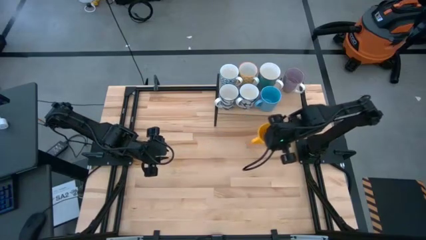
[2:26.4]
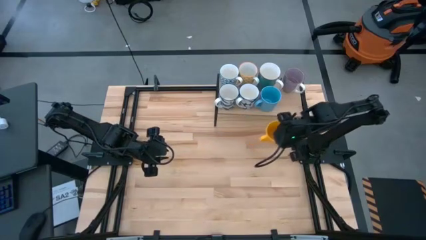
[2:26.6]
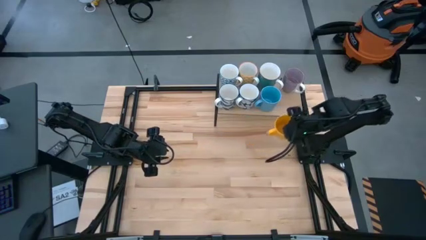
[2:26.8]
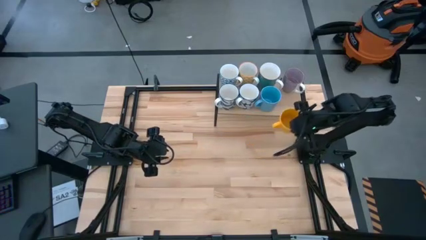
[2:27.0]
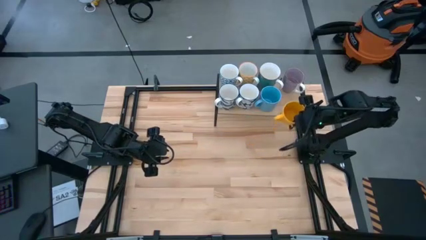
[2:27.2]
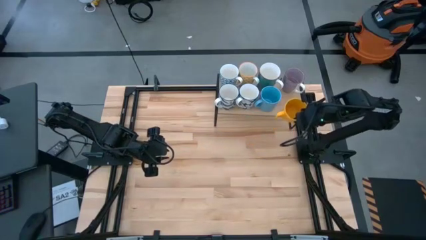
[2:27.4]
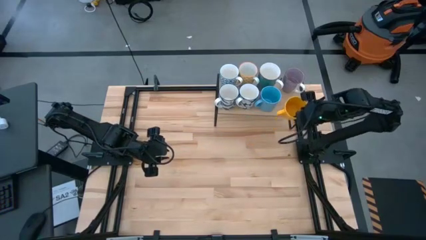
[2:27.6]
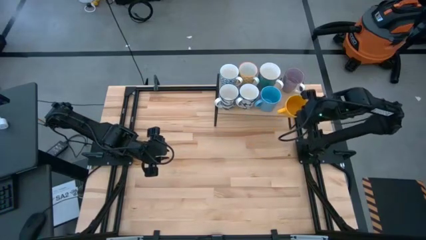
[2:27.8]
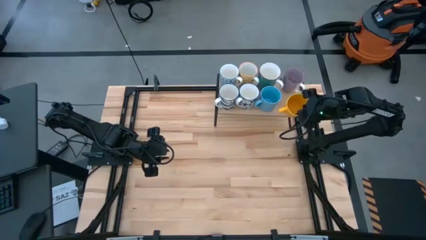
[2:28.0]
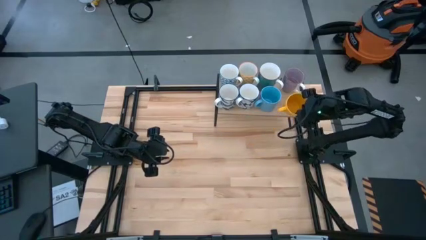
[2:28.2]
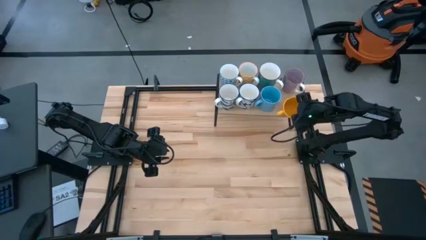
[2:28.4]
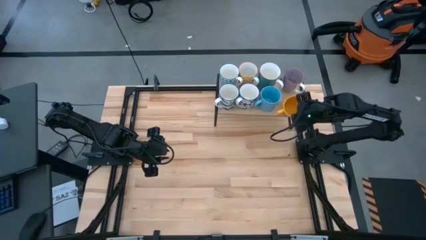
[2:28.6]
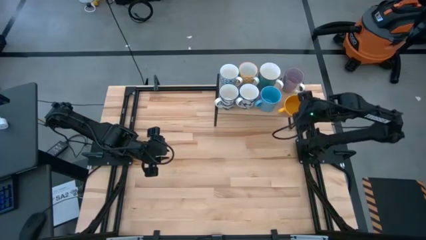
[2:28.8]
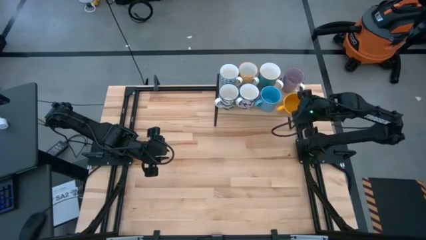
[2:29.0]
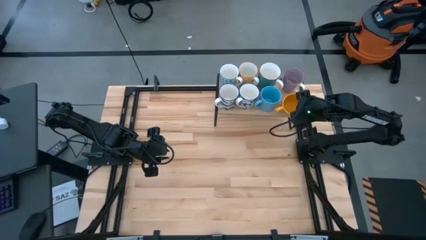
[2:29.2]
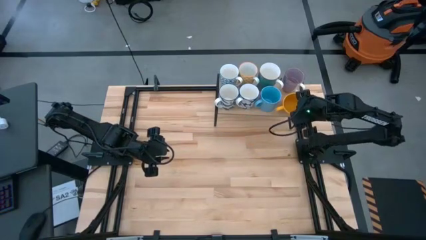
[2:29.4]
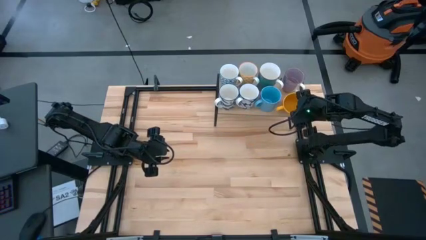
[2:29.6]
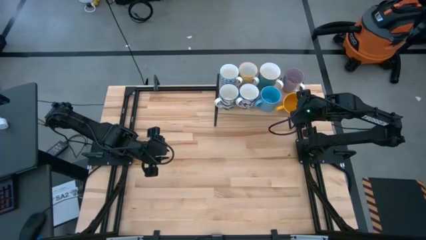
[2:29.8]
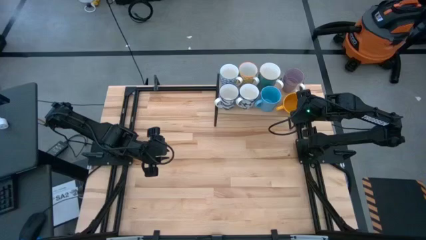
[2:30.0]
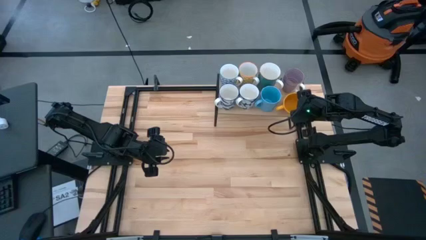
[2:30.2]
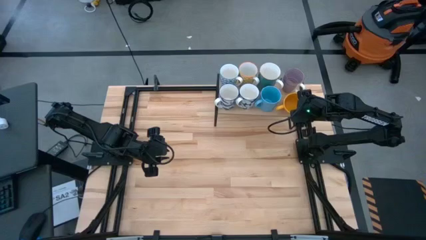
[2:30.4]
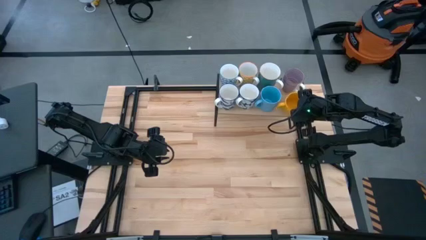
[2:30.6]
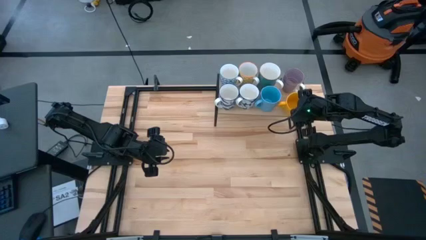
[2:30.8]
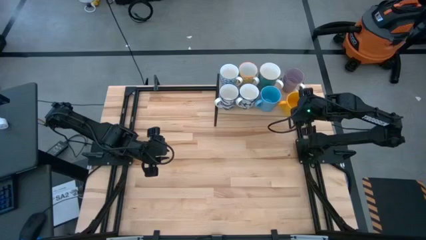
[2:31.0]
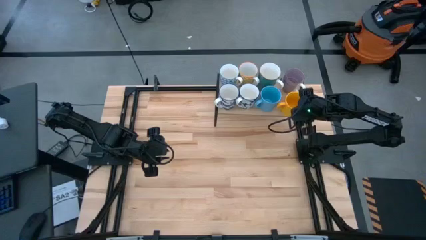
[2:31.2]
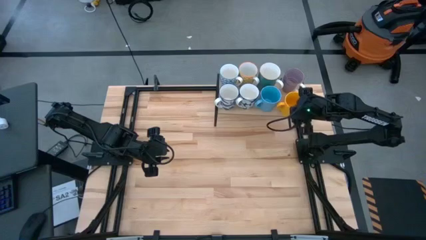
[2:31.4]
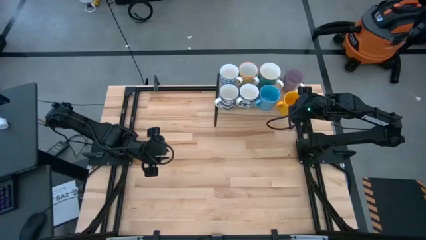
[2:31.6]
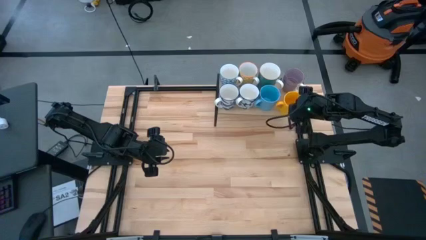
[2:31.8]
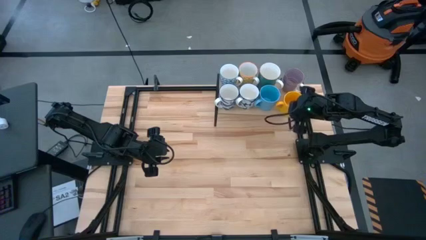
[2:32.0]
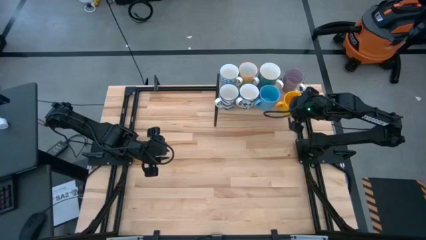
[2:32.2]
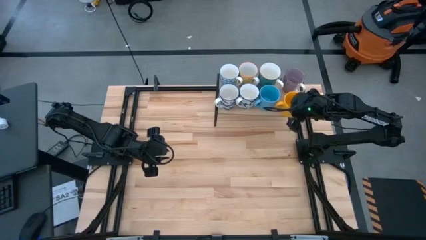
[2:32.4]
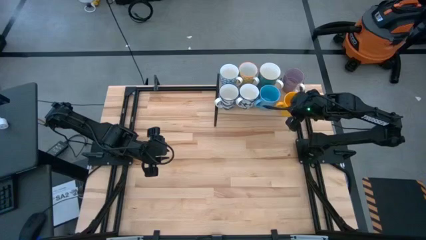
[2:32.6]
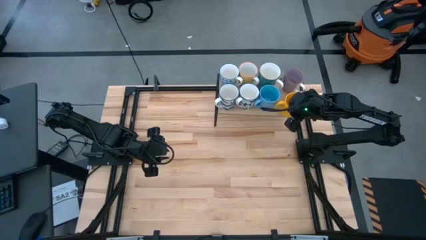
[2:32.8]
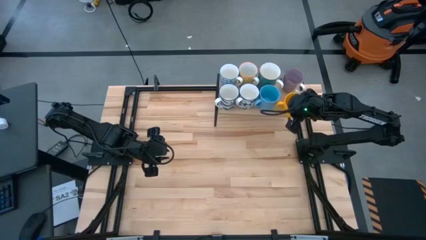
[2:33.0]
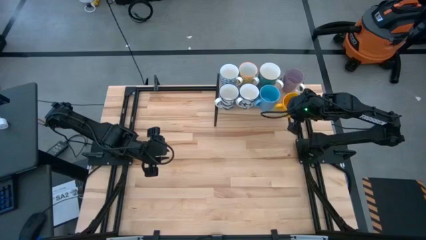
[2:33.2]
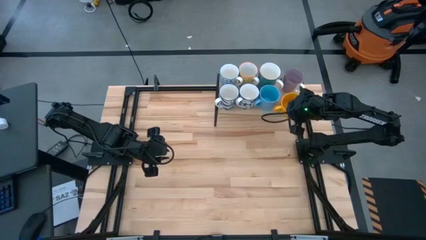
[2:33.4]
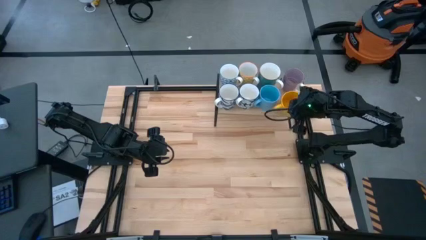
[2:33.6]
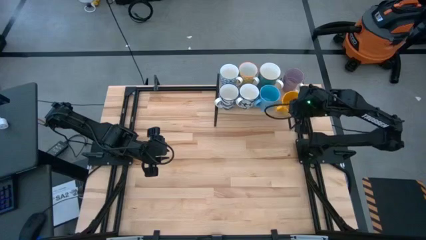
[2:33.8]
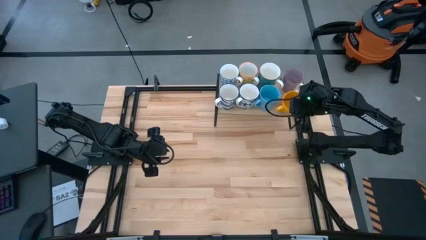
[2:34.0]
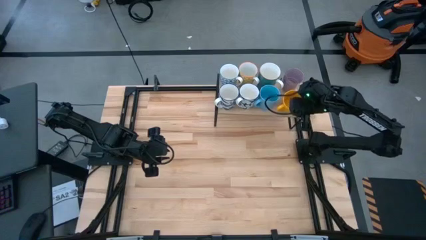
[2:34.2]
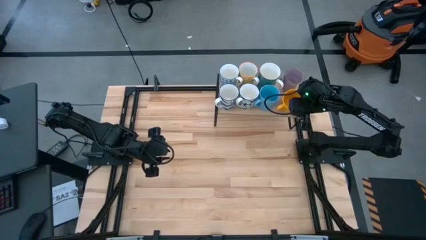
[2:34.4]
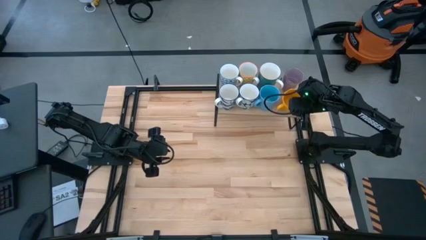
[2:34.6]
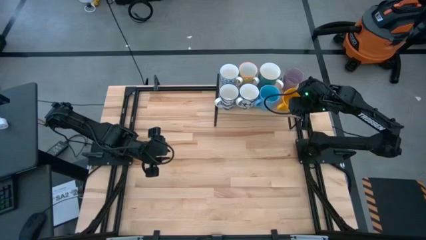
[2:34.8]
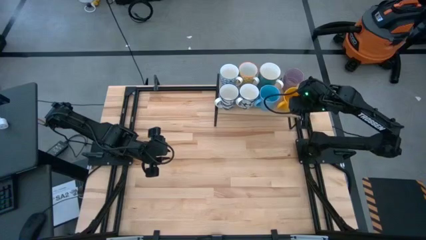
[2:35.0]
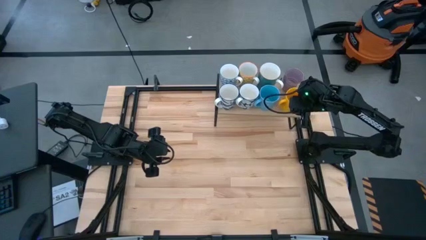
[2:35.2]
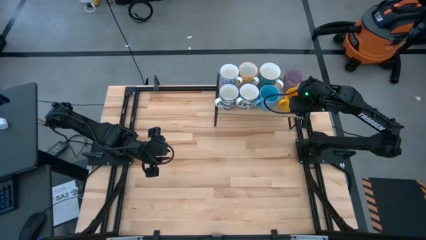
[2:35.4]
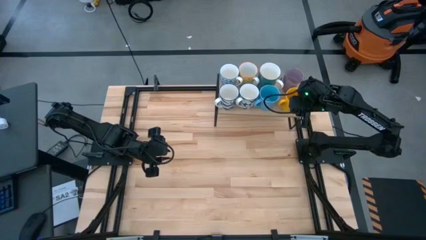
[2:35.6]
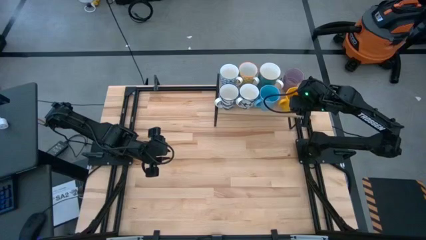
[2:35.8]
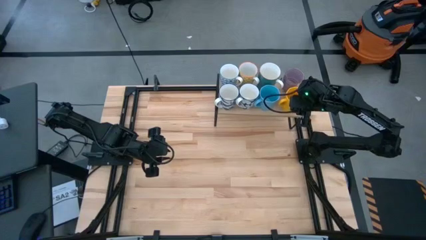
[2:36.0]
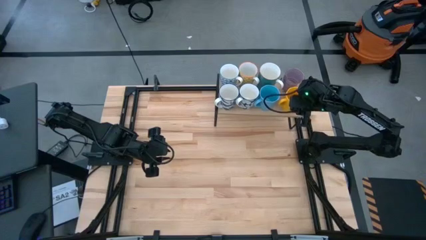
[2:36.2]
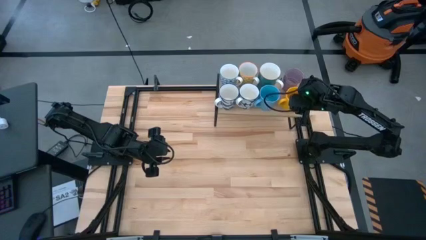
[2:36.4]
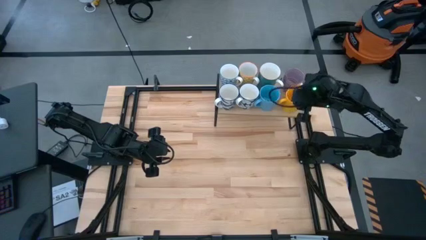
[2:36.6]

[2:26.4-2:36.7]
Task: Place coffee mugs
Put the yellow mug on the shelf

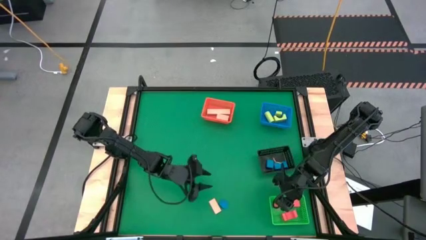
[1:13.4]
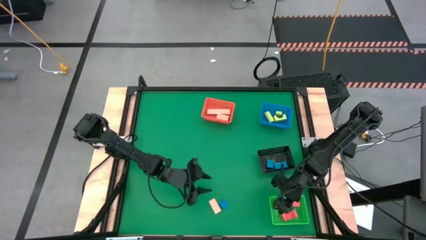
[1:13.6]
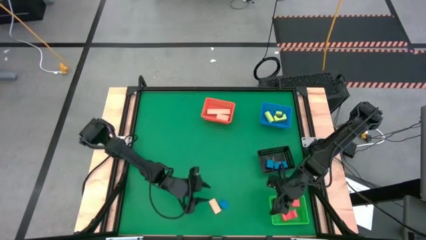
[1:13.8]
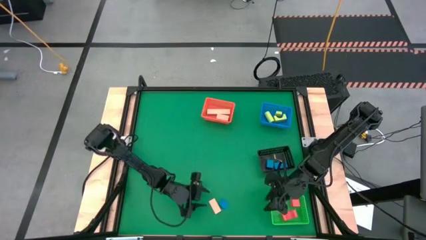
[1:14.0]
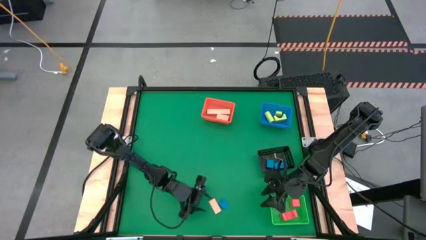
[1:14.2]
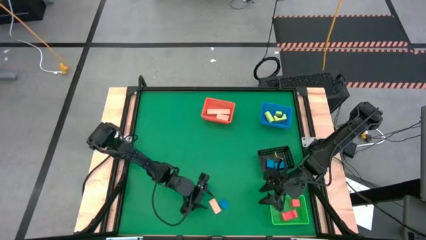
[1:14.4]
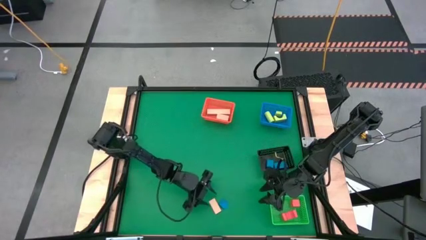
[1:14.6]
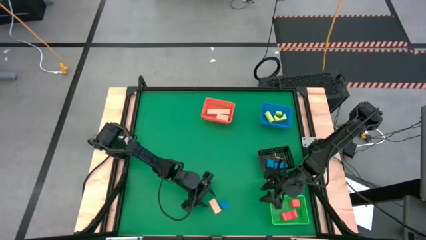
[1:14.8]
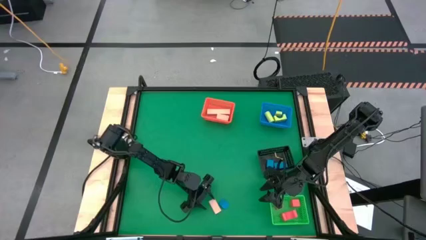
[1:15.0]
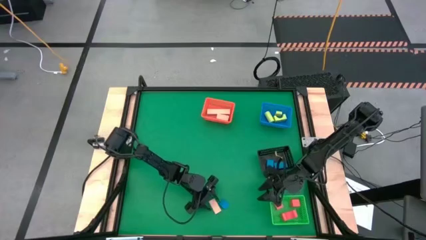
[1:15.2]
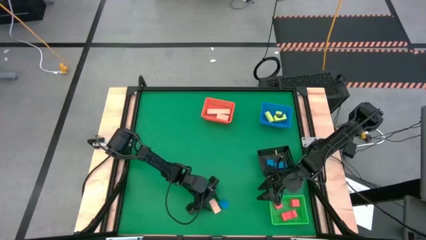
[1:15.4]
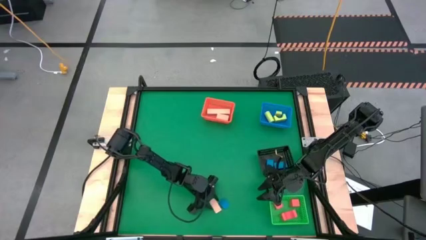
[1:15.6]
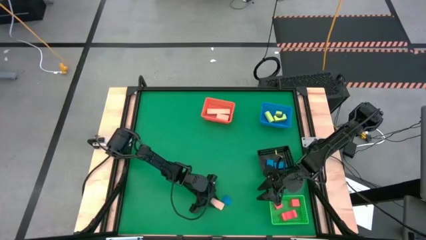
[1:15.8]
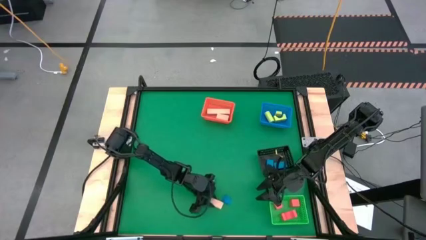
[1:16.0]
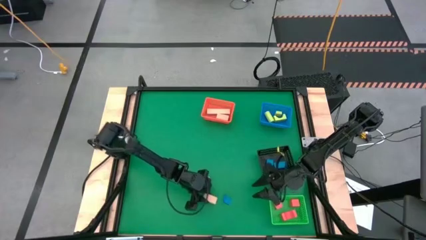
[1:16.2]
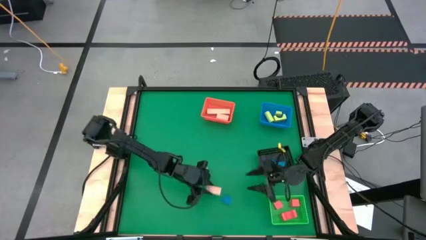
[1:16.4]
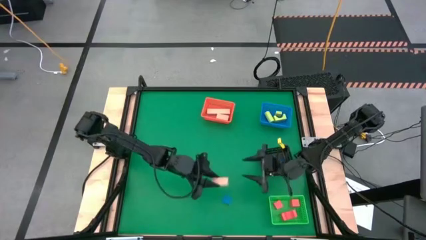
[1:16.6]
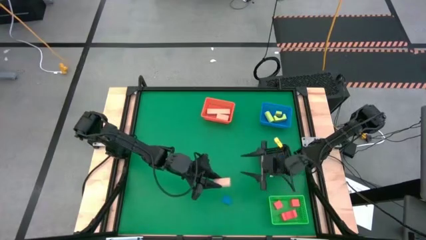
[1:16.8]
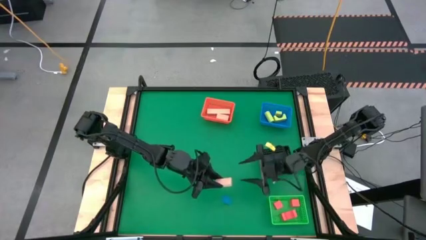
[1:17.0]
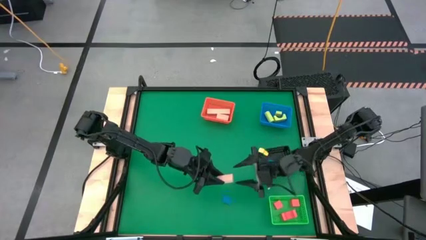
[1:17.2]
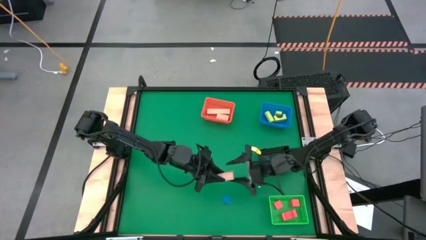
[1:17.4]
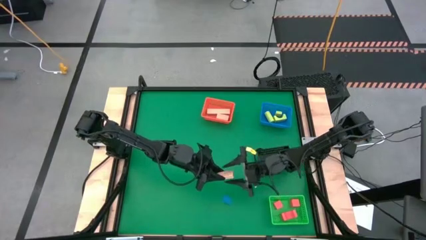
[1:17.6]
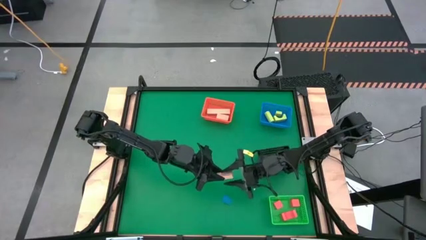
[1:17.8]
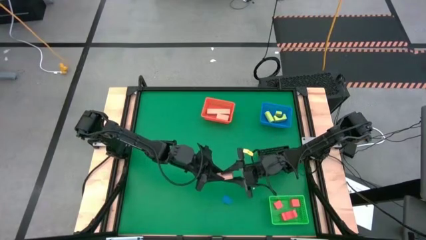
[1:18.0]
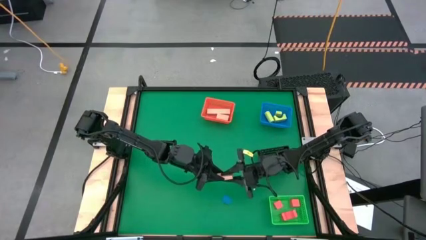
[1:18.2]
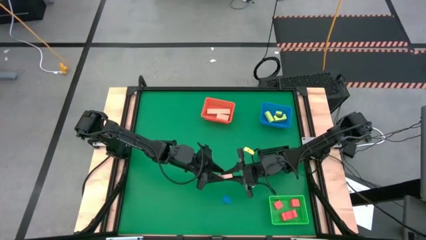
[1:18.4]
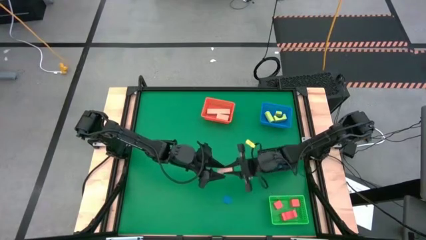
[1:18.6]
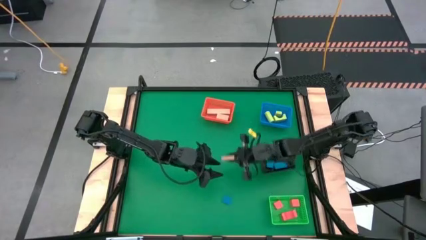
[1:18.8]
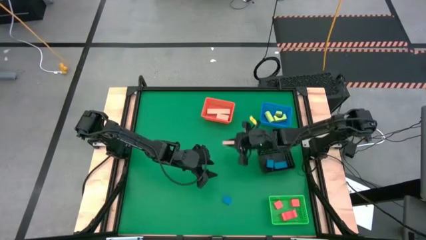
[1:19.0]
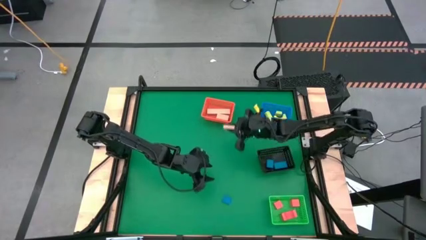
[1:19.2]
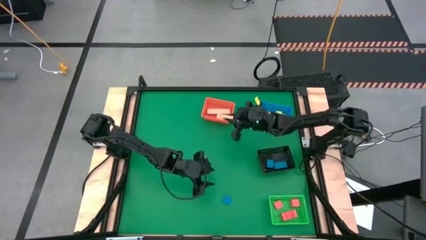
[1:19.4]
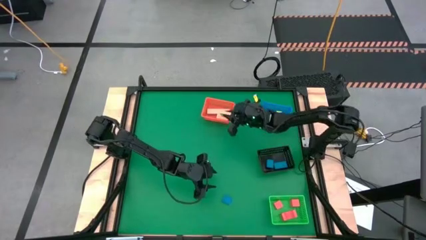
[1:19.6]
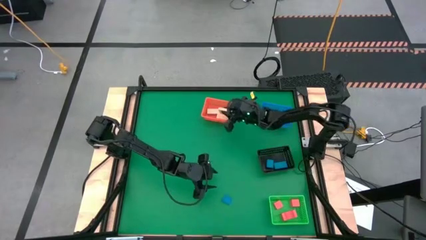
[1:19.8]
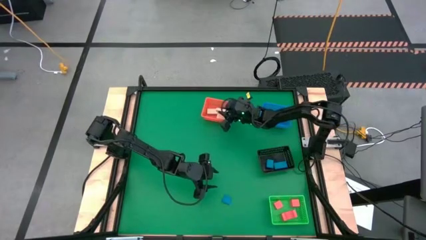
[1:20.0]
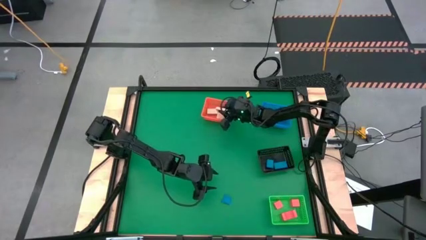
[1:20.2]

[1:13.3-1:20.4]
Task: Sort & place blocks by color
Put the brown block into the orange bin
